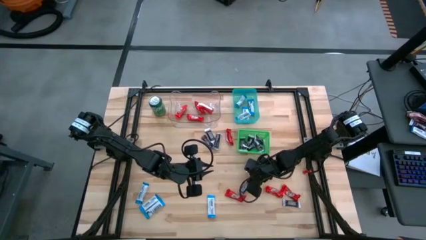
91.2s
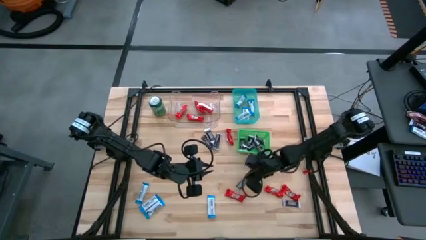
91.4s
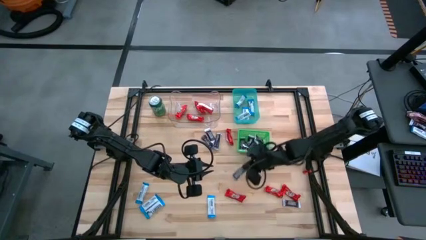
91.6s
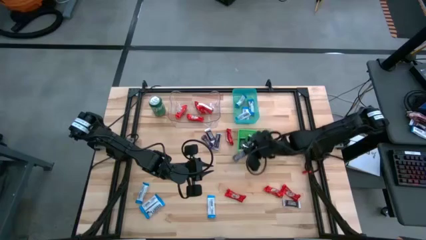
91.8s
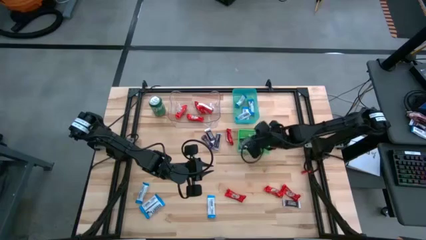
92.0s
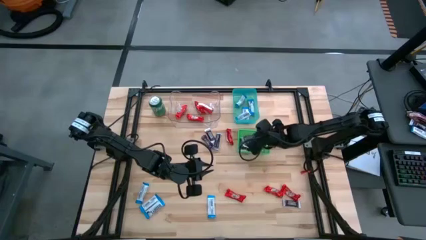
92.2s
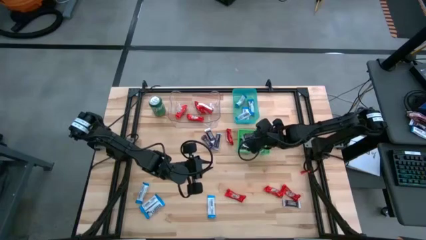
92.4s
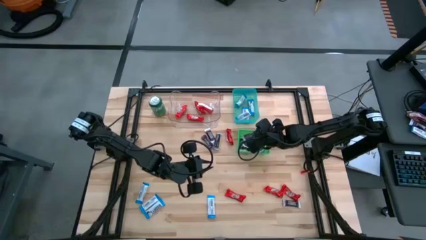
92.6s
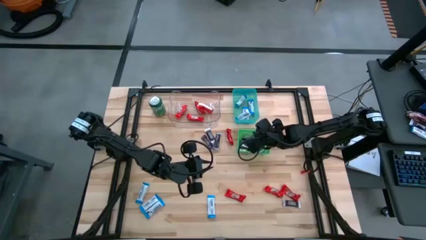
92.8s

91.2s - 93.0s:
Task: Sort candy
Put the brown chocolate bar into the green bin

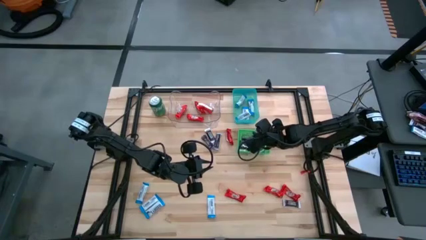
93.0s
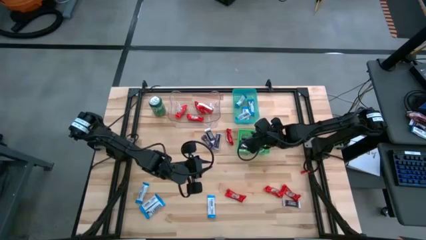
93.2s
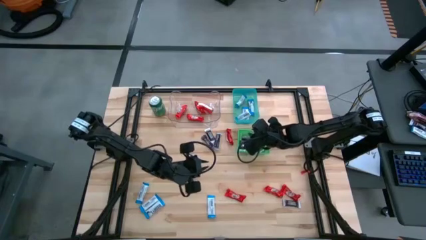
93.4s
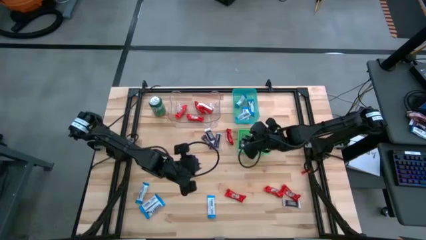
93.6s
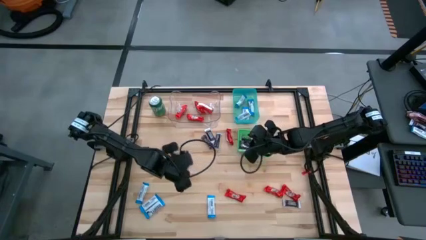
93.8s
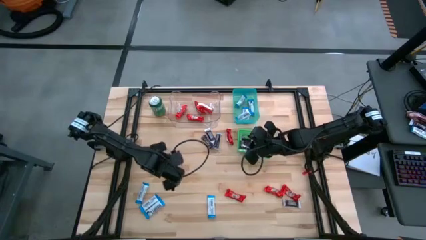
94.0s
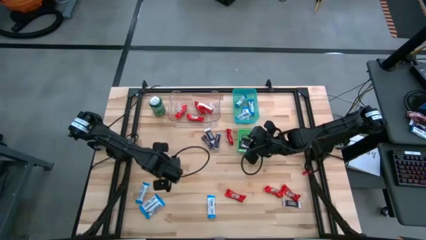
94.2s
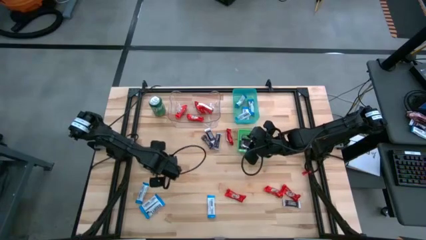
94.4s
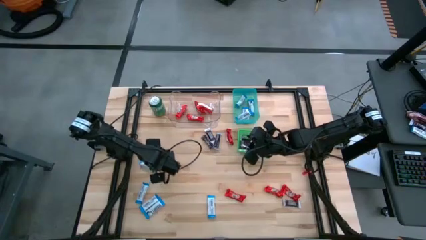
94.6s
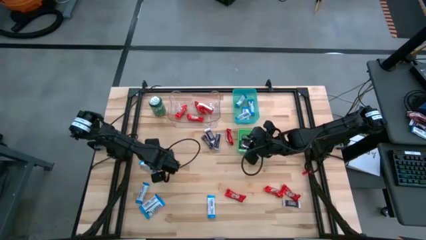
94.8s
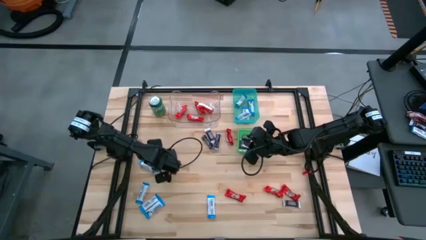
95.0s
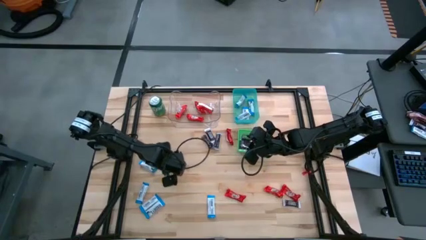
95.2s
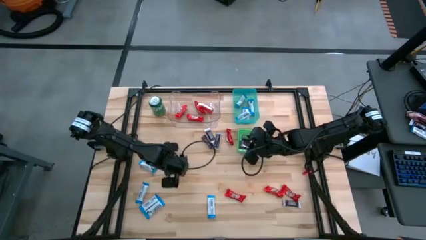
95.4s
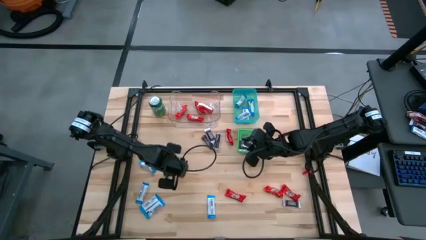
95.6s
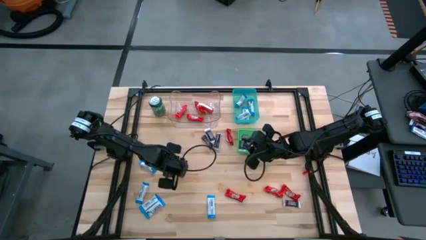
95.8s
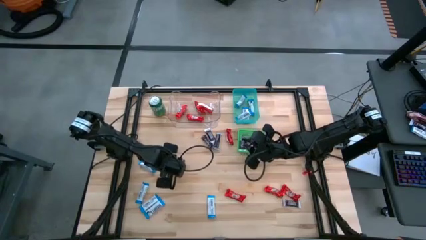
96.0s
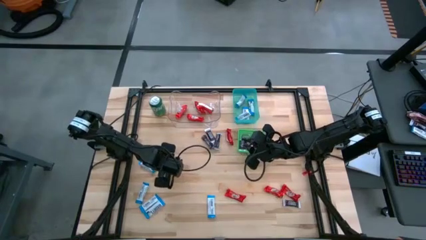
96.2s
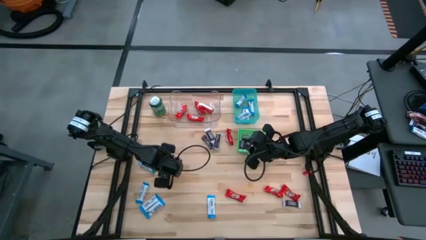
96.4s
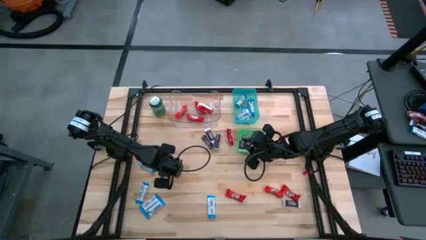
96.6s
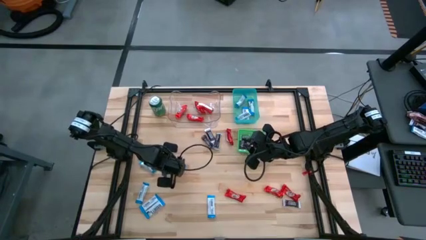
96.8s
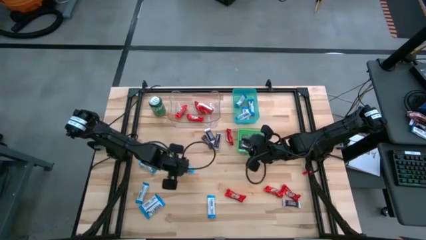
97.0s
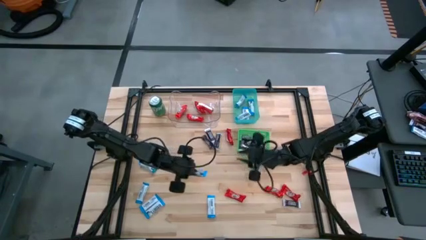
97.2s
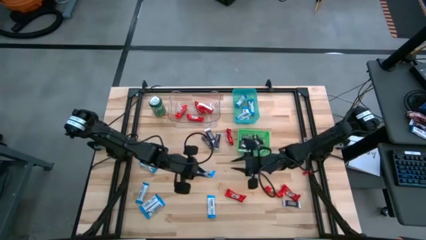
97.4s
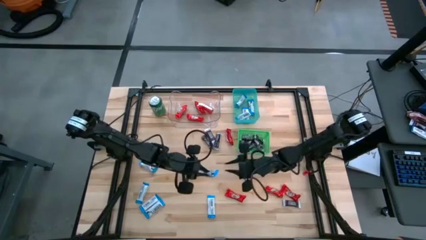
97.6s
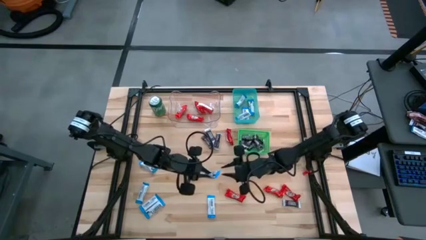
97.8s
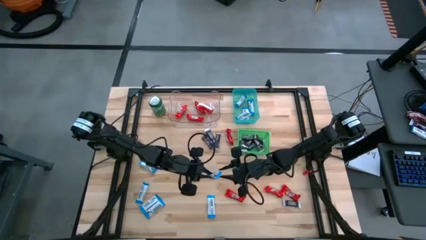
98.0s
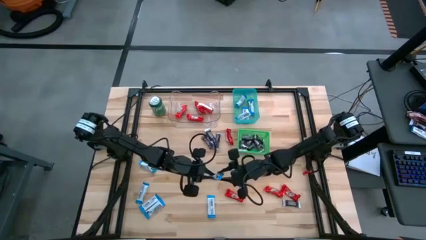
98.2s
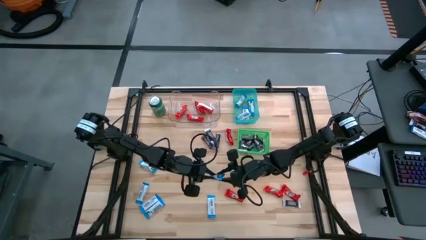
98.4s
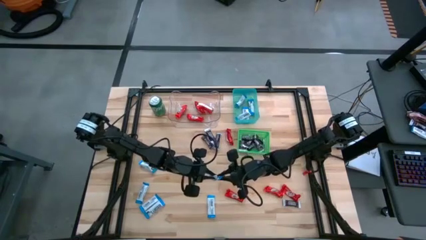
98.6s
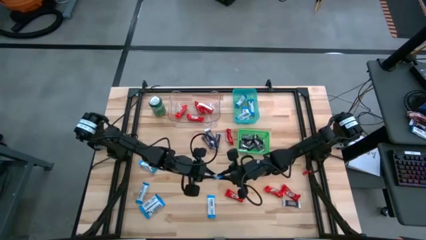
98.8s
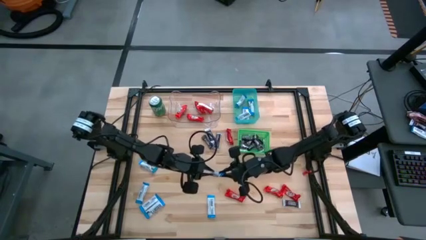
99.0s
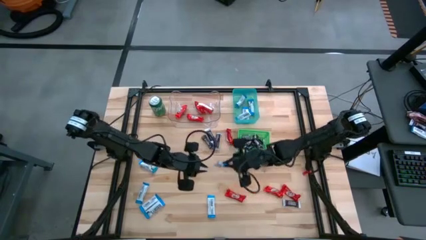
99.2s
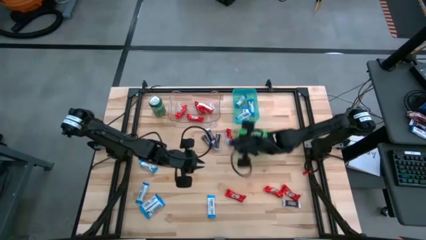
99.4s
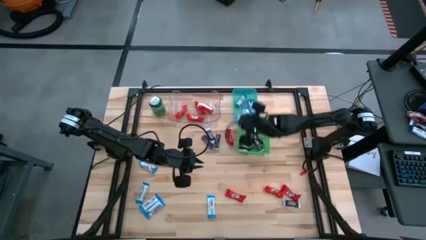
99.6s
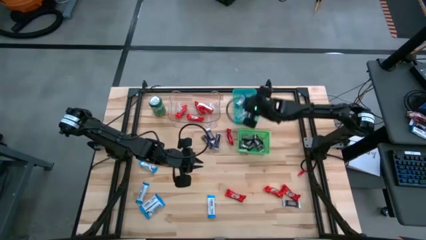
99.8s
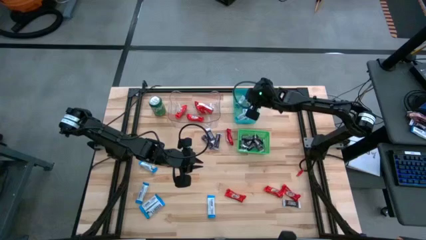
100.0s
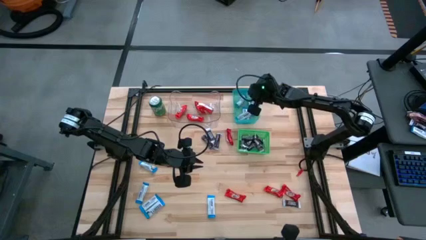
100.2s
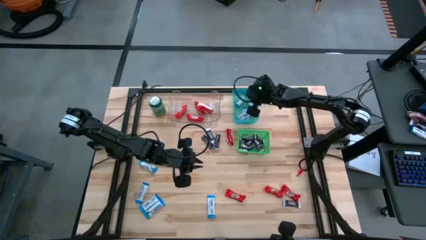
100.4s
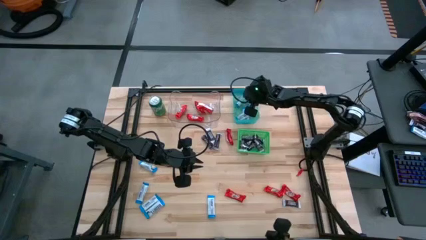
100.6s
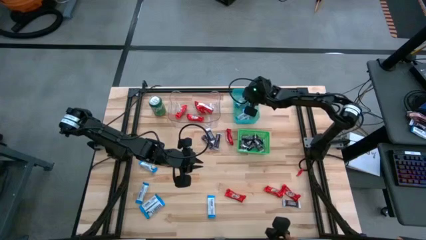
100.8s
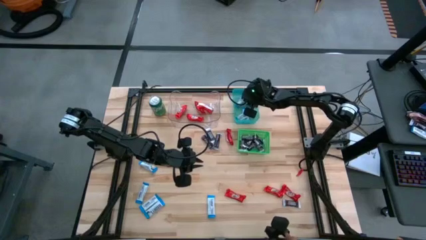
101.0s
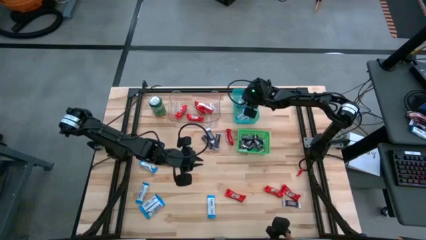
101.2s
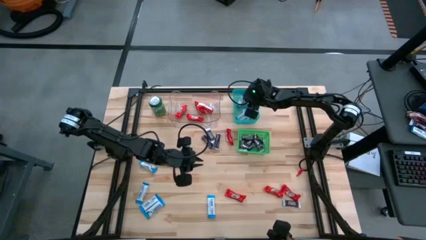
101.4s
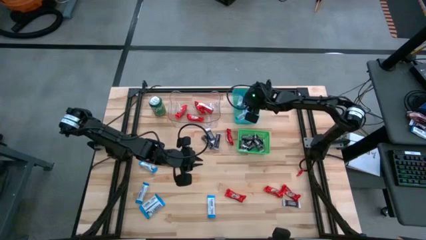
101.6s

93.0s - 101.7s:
Put the white chocolate bar into the blue bin

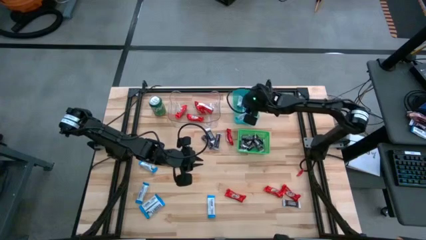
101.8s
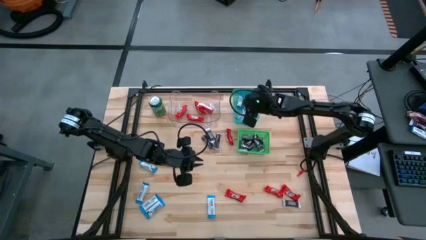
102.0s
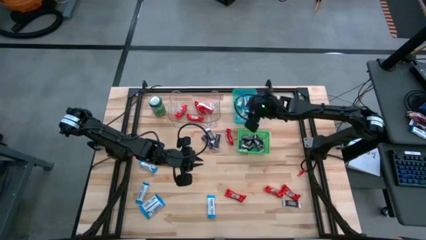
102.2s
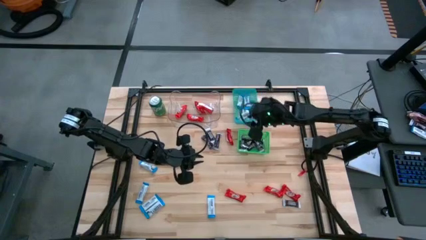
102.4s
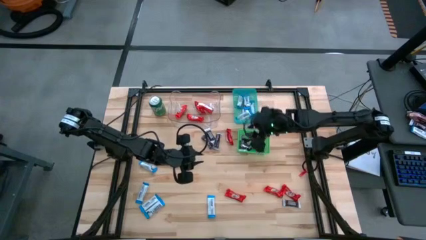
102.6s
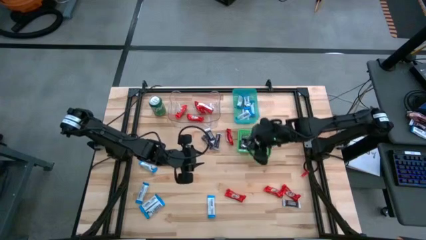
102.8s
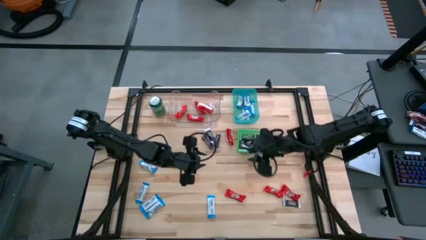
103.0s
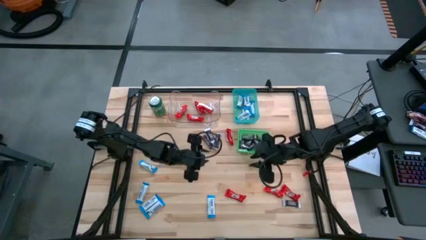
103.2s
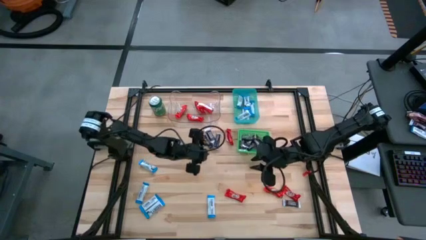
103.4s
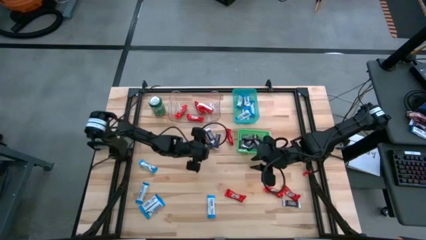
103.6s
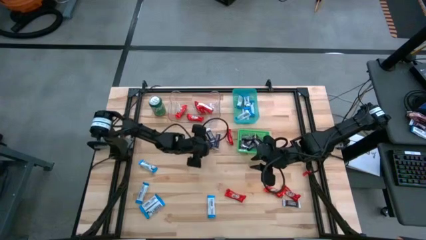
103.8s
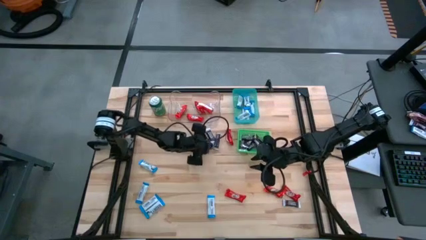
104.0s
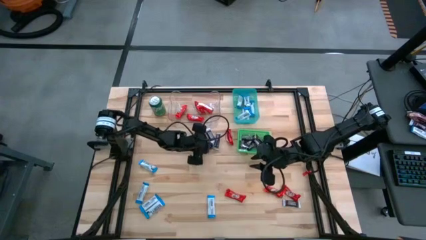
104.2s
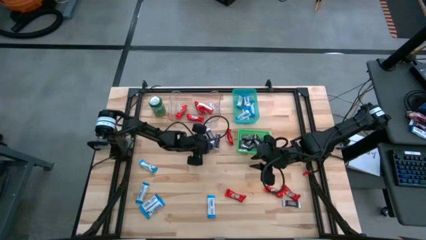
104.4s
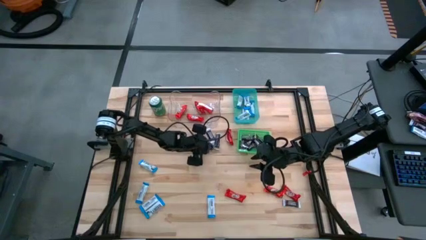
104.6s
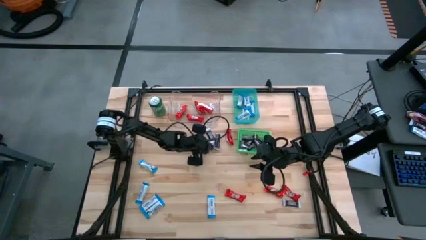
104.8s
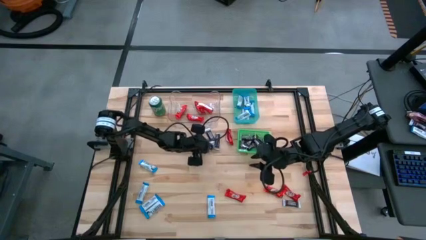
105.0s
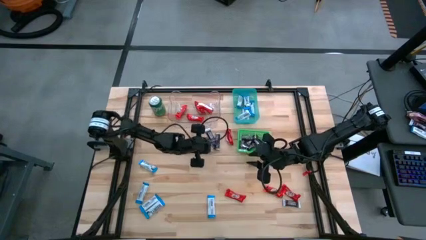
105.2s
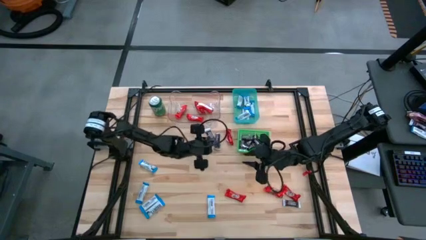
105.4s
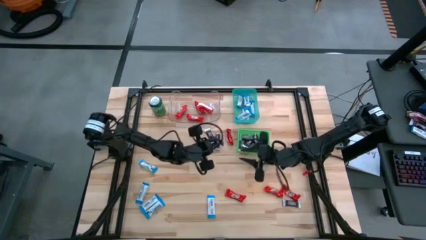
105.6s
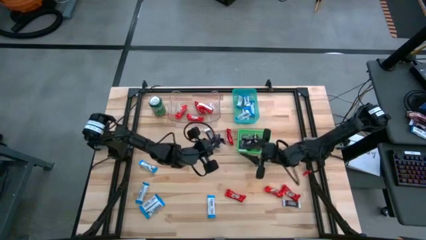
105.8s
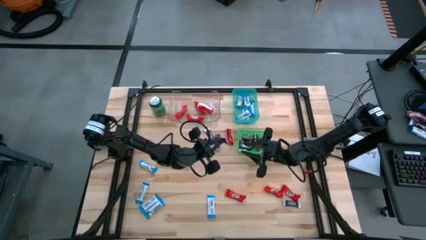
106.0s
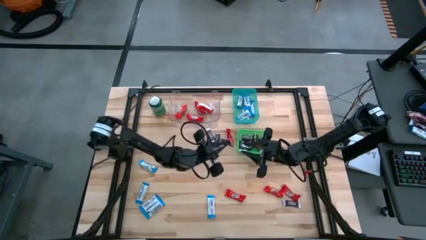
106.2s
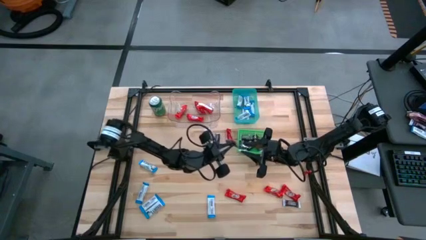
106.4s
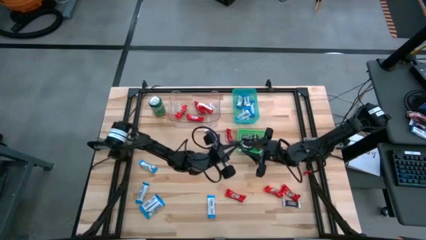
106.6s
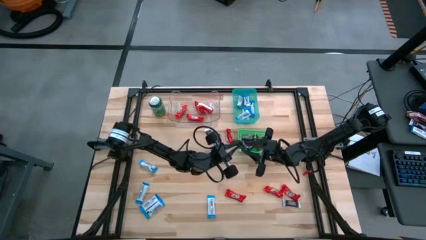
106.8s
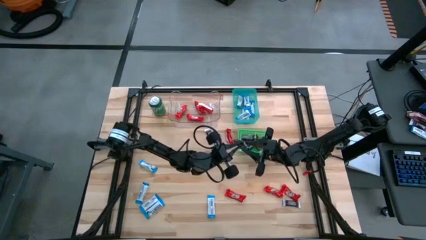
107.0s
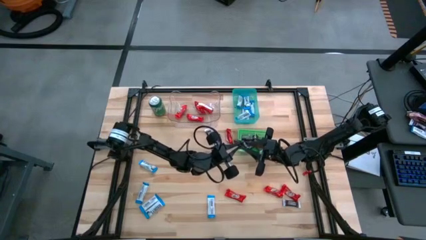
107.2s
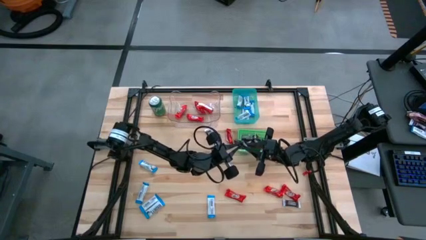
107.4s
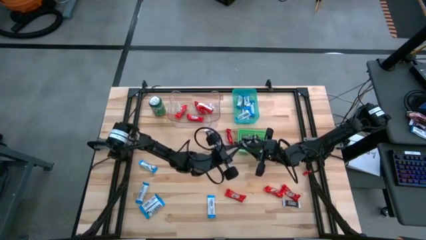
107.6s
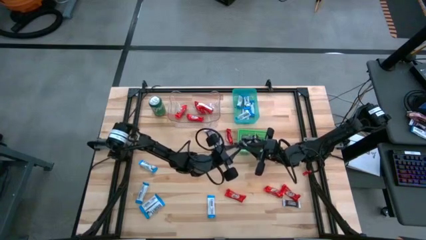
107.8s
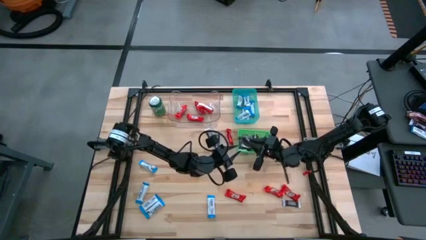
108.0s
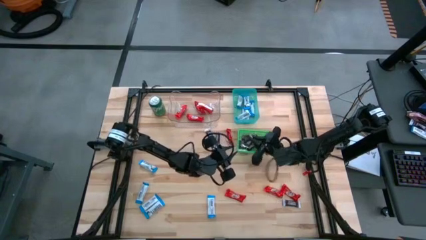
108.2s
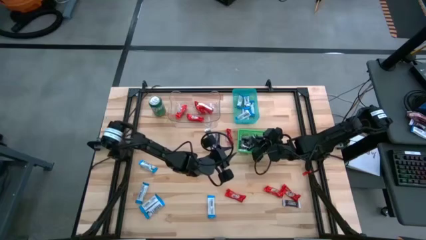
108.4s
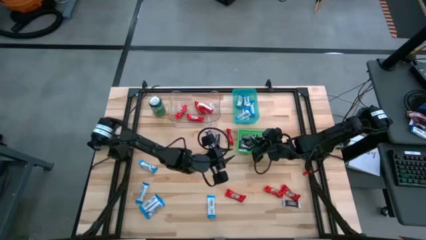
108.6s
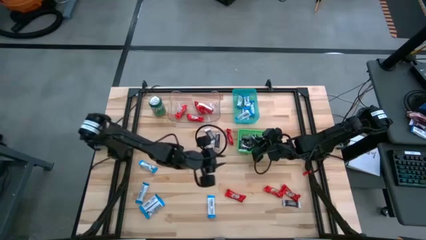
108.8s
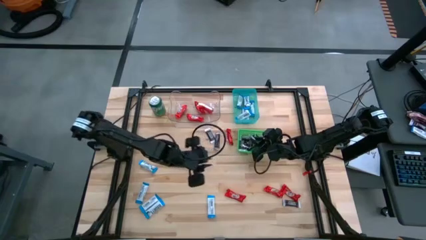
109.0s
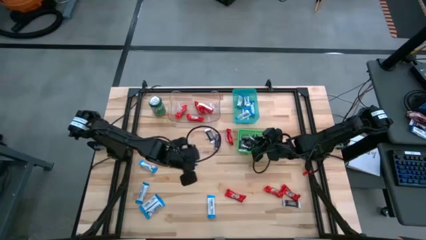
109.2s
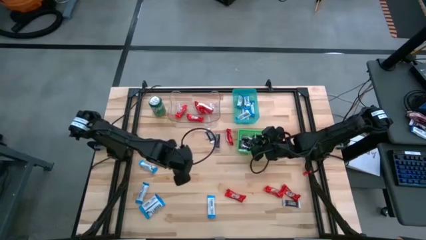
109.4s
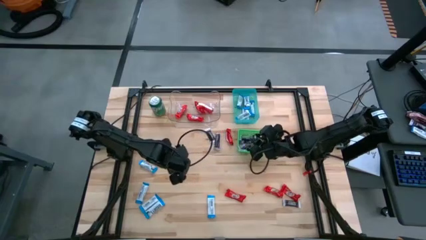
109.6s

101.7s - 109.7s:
Put the brown chocolate bar into the green bin
